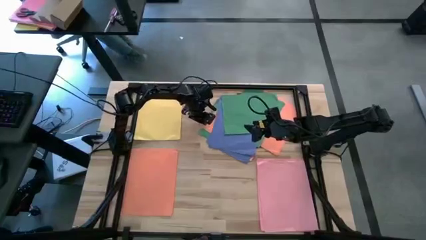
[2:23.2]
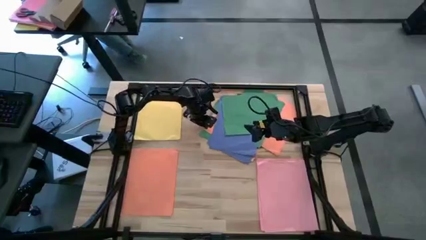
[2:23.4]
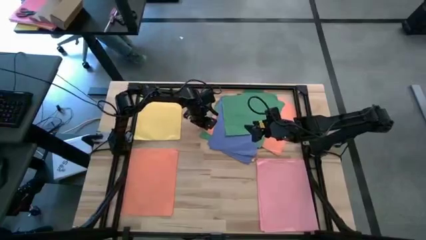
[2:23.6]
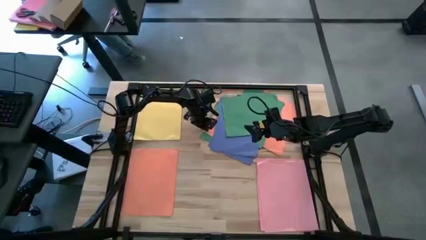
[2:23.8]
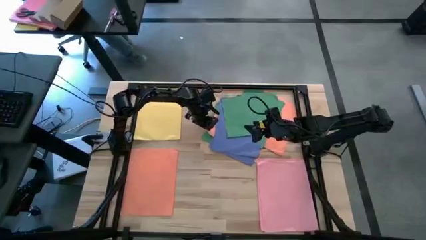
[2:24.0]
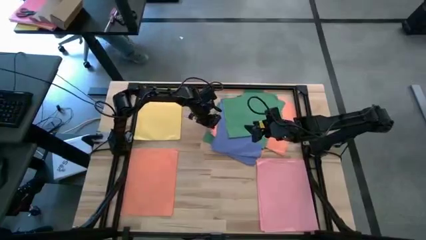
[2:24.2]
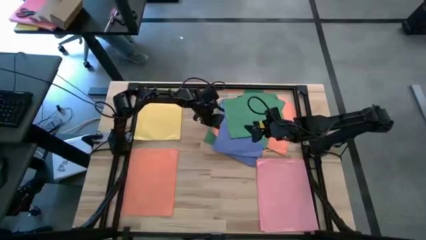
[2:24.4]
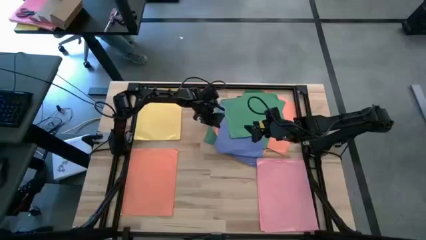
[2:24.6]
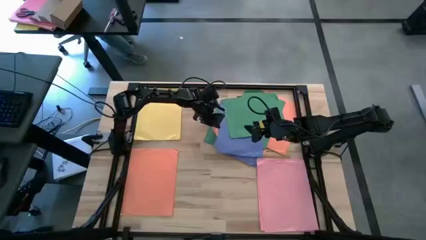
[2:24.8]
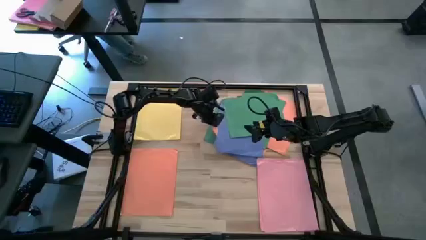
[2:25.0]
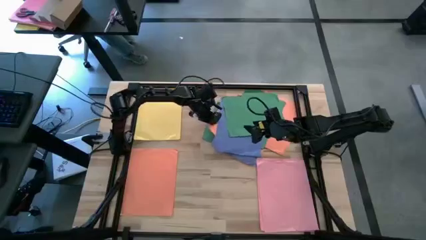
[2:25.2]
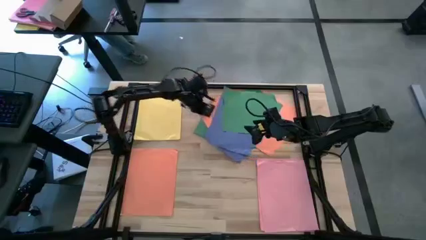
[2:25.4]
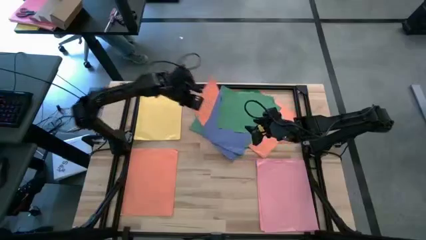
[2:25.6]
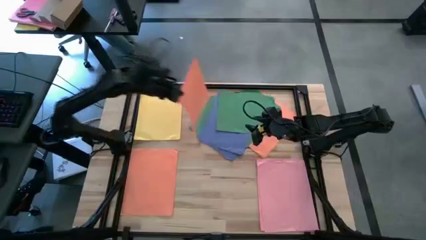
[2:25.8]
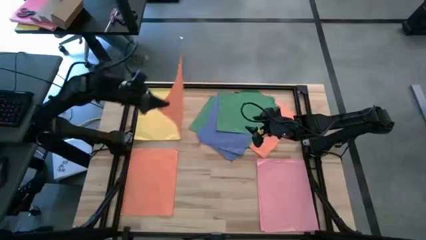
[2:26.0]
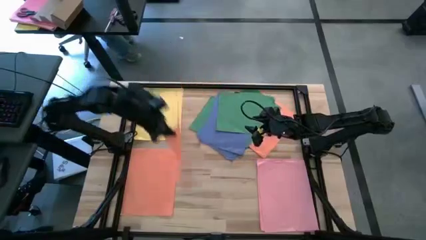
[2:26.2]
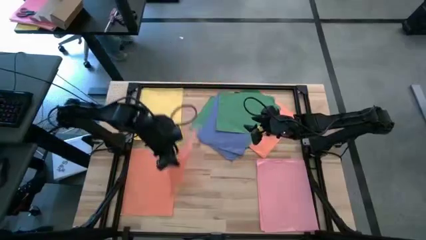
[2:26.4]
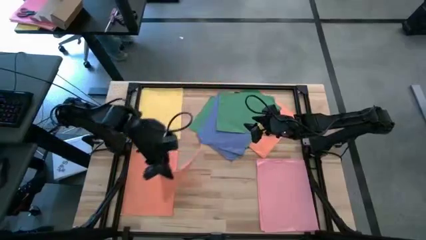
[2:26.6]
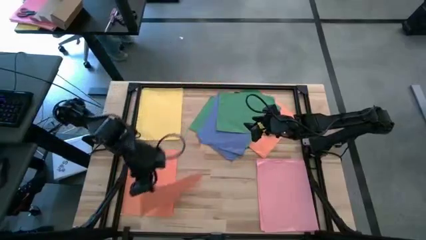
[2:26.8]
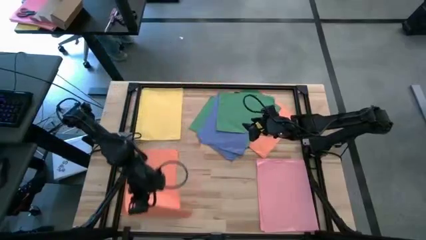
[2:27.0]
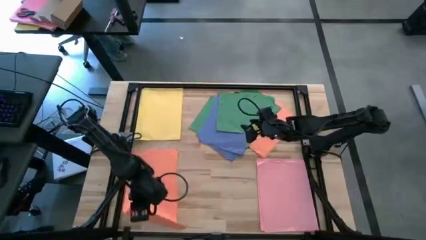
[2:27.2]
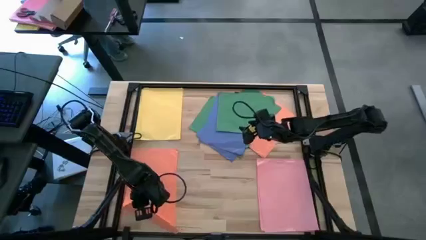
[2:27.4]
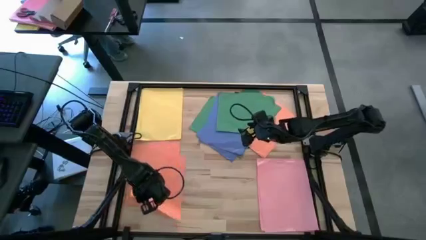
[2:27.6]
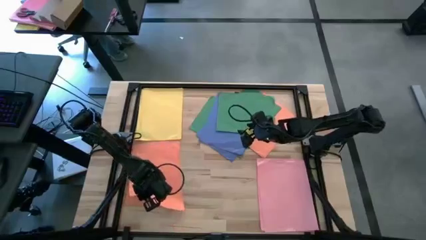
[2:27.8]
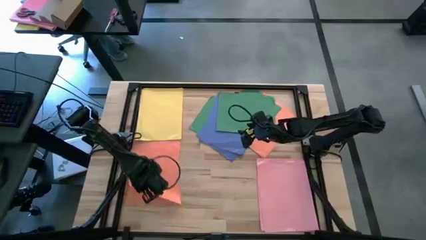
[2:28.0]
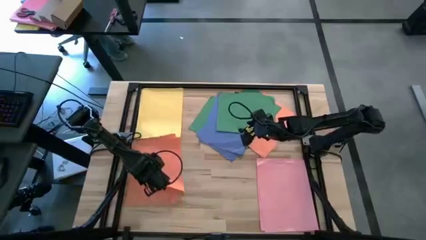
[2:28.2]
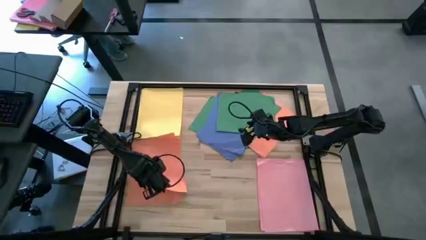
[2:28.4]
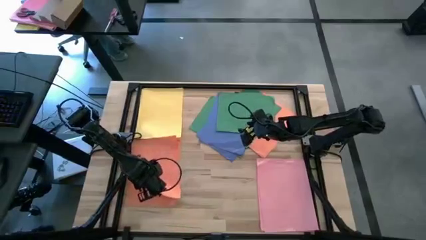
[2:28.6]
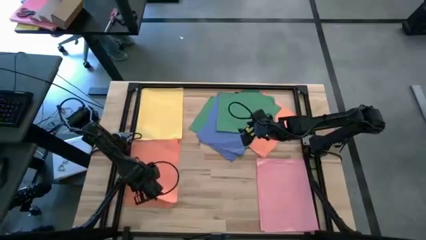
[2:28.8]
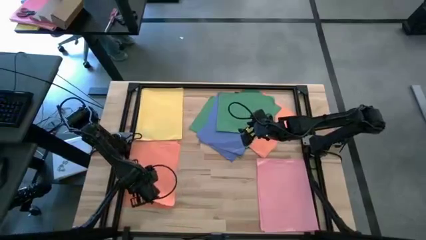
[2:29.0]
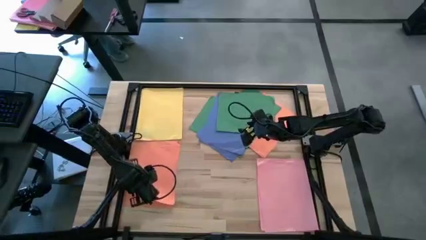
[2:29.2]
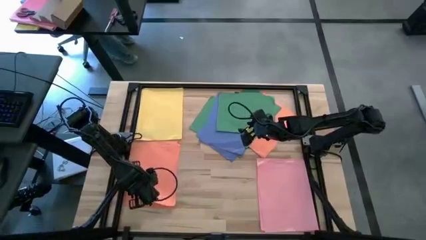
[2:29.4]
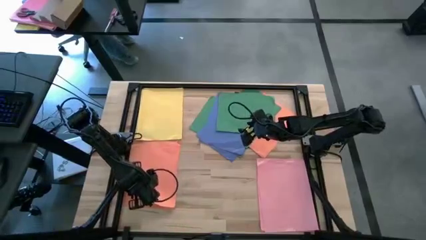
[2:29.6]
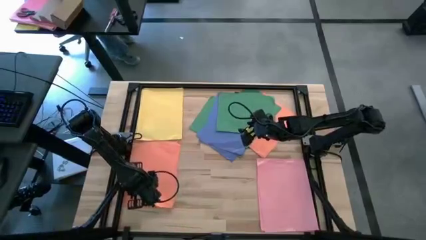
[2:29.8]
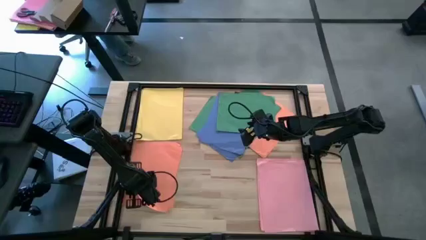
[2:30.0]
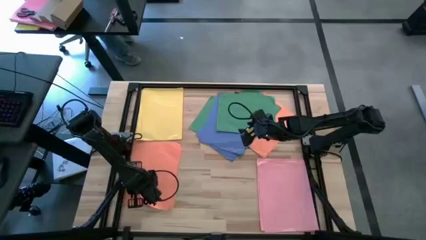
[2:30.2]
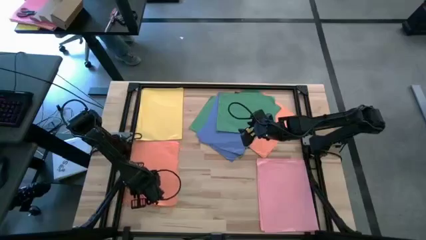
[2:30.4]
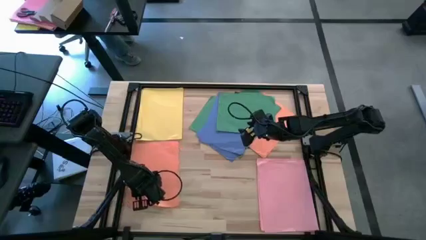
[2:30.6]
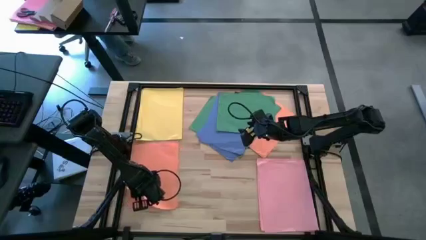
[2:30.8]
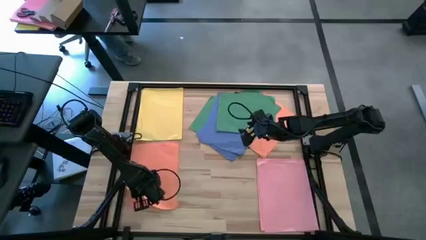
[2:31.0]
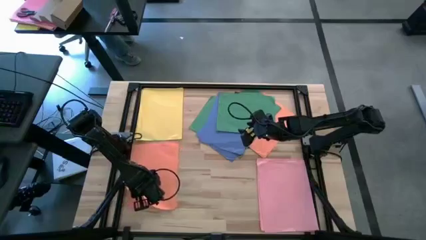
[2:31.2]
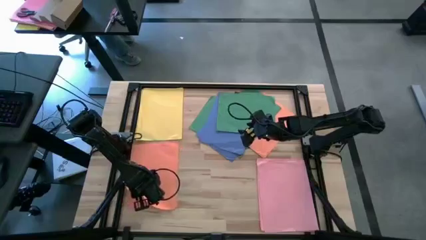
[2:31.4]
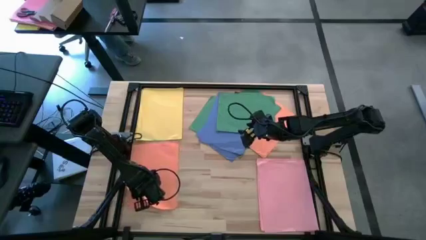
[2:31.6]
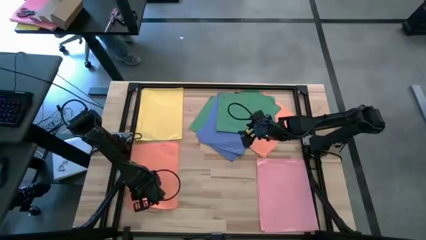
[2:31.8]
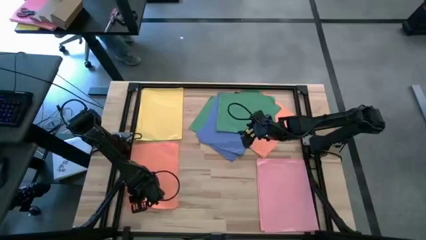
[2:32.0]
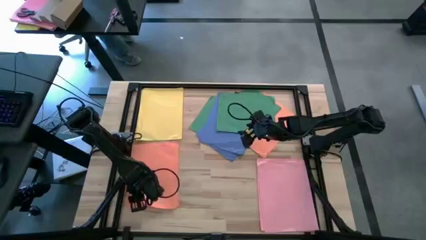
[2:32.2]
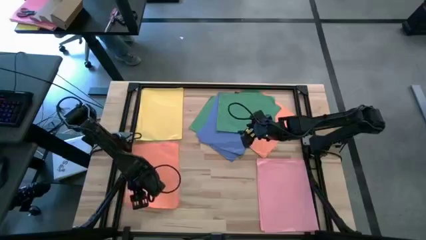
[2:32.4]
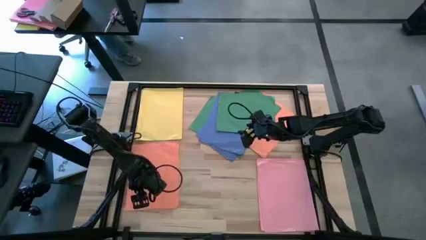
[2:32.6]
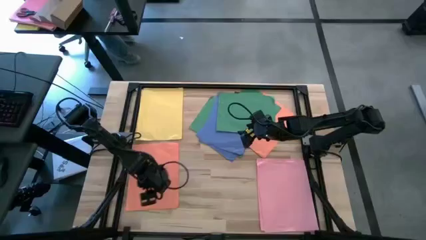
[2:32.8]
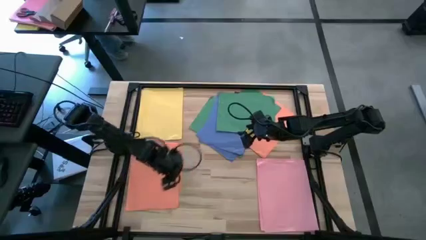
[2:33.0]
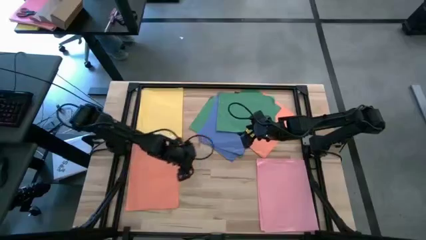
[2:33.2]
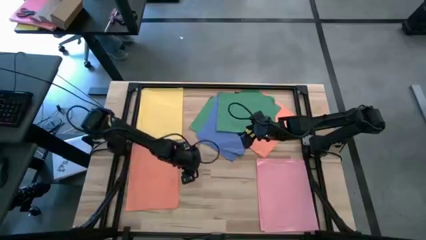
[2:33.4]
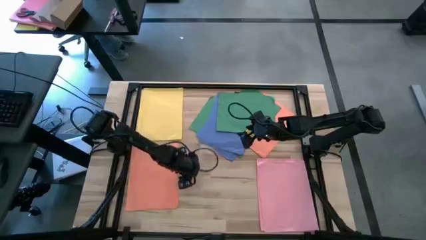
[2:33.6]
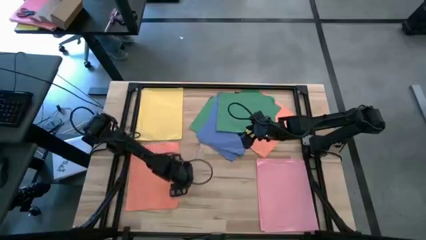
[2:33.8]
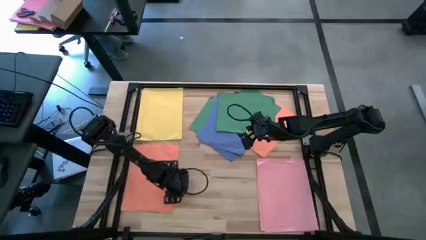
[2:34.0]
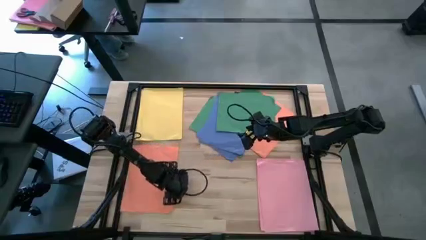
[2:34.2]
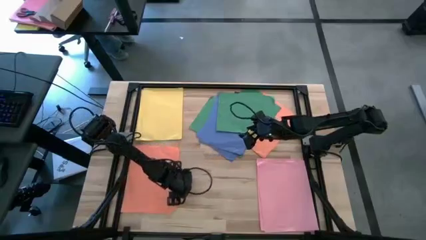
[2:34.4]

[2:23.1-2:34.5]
Task: Organize paper
Stack the orange paper on top of the other orange paper

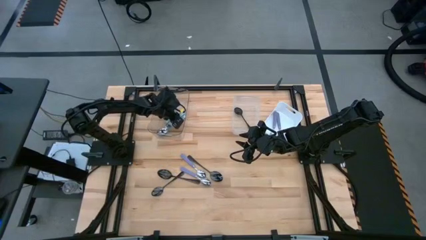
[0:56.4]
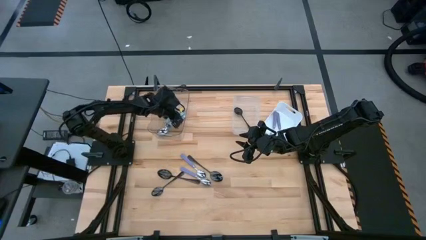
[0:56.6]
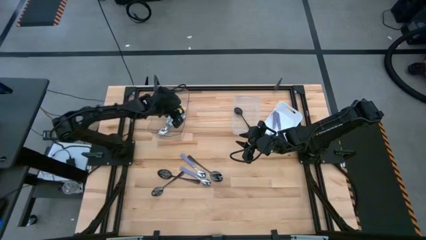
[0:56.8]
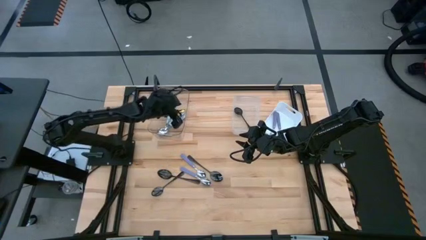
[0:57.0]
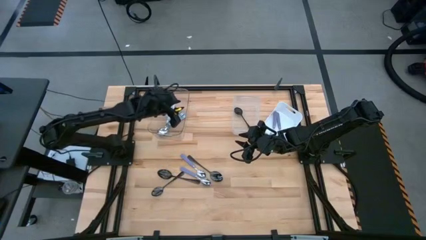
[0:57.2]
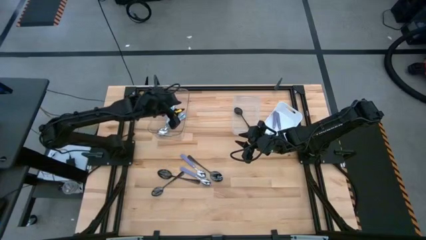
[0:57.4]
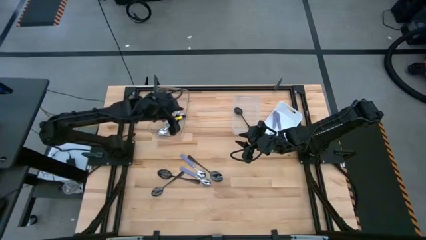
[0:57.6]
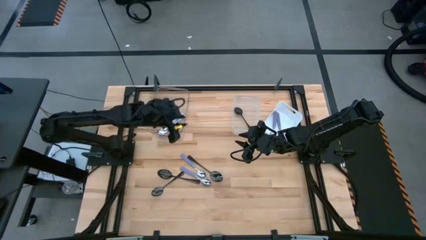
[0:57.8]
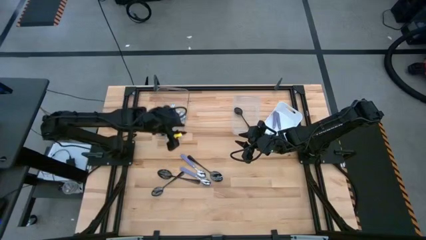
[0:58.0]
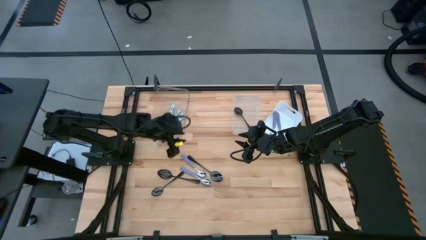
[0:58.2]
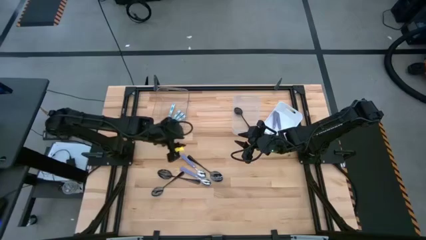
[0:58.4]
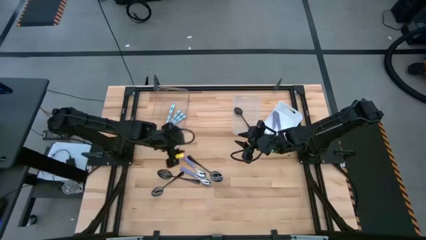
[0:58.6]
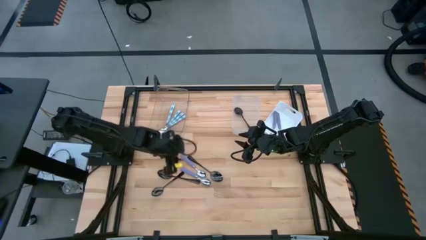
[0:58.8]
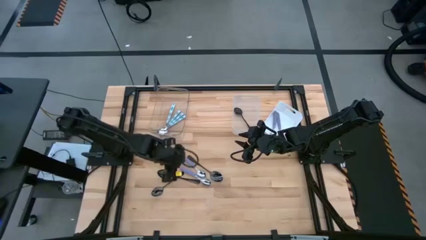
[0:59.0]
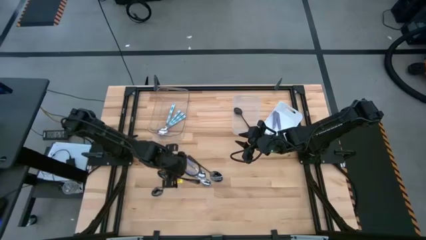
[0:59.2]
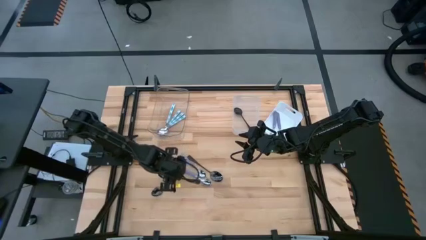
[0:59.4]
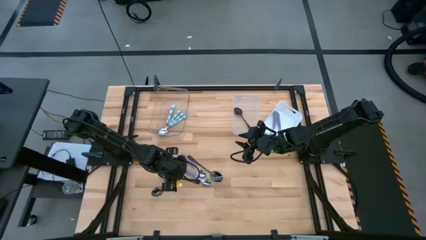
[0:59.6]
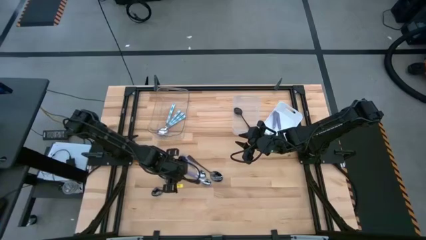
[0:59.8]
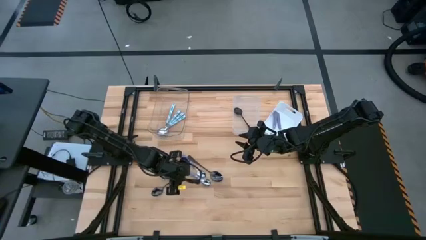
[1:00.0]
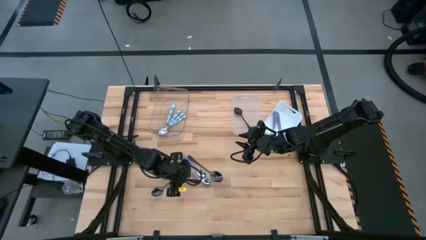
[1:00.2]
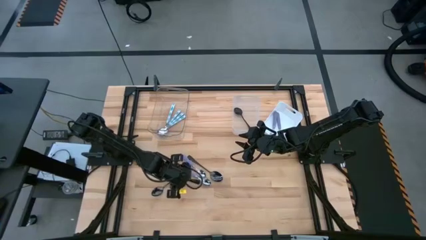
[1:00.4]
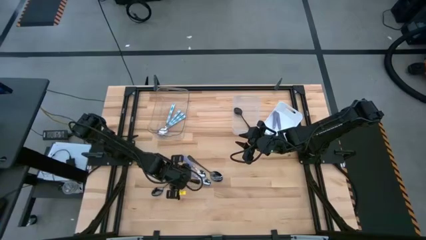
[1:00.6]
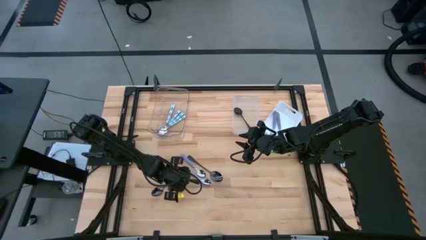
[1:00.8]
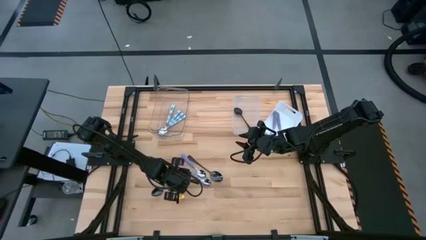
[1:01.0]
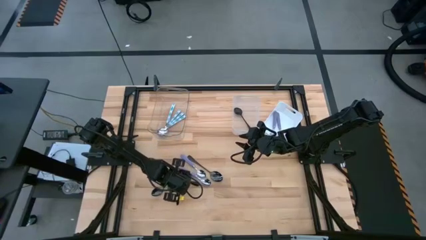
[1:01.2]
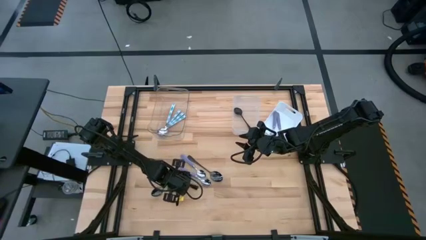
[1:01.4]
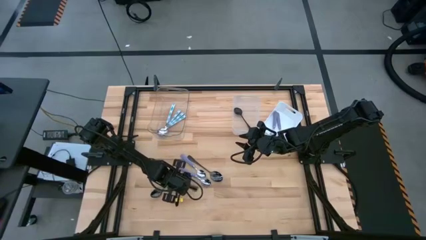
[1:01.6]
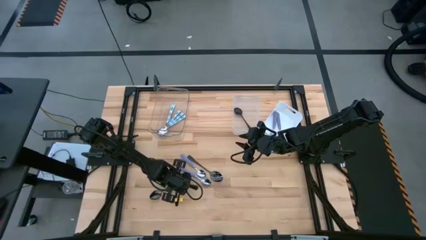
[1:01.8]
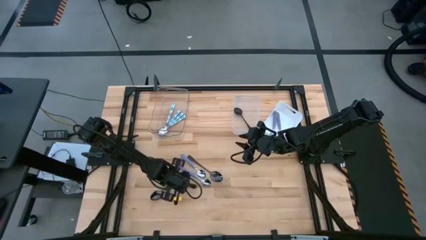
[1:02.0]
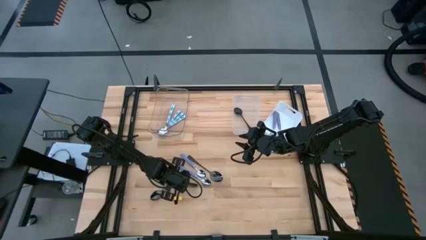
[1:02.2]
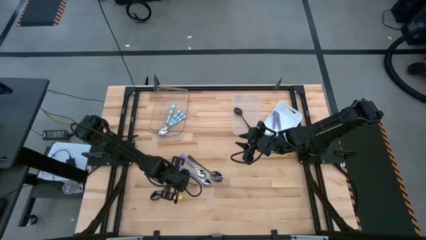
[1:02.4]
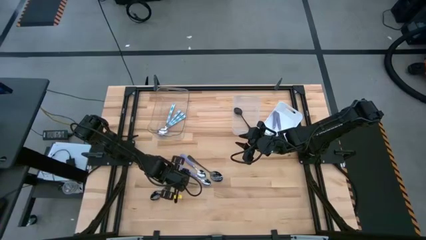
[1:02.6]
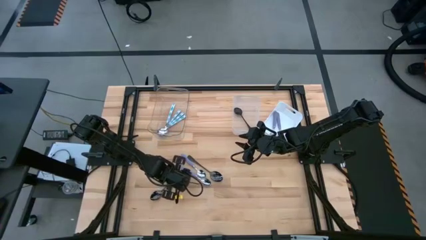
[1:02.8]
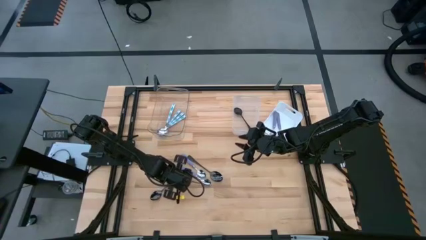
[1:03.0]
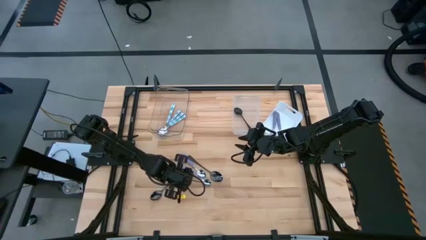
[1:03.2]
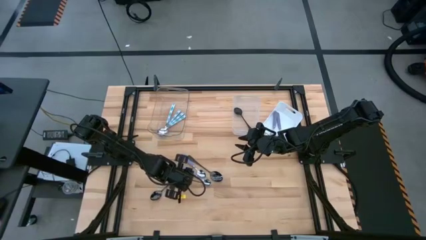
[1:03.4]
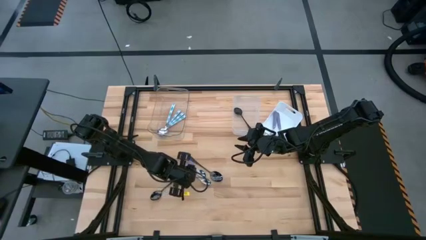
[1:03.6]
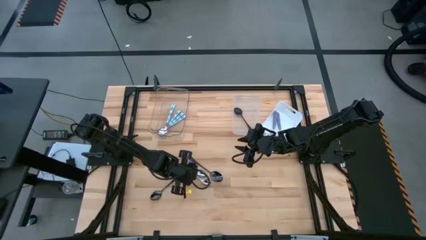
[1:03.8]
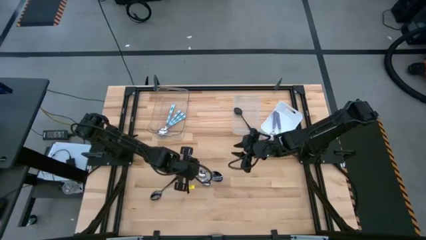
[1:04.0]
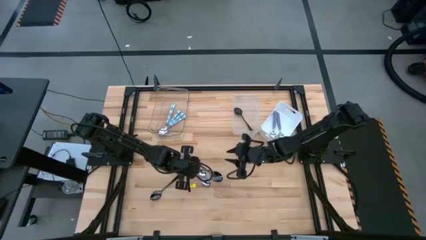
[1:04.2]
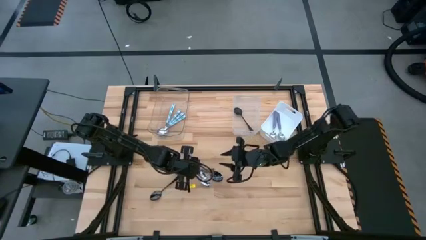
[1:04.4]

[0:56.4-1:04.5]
Task: Sort silverware by color (type)
Put the black spoon into the transparent white bin
